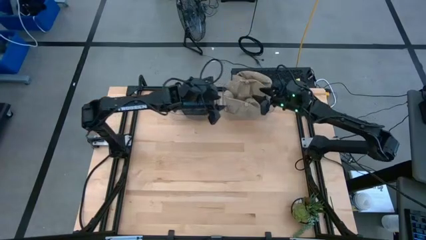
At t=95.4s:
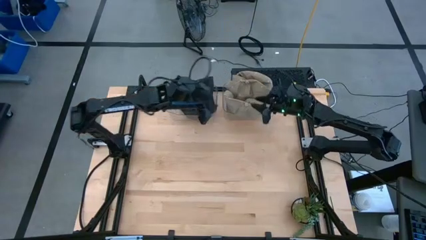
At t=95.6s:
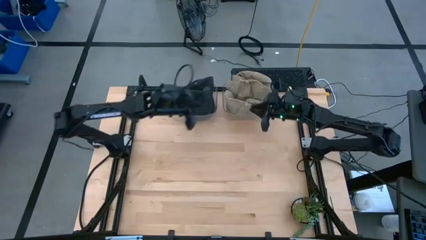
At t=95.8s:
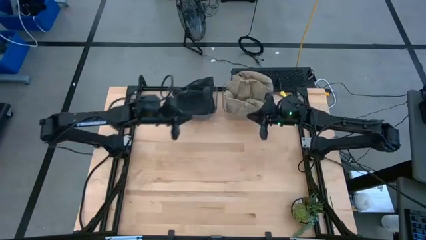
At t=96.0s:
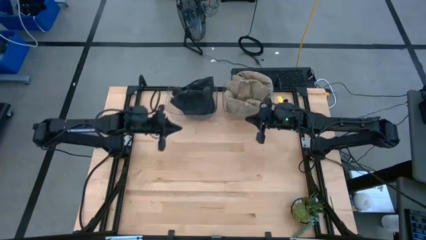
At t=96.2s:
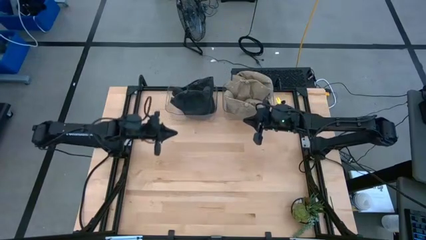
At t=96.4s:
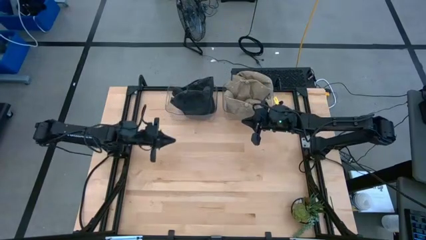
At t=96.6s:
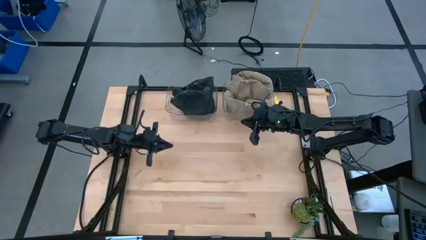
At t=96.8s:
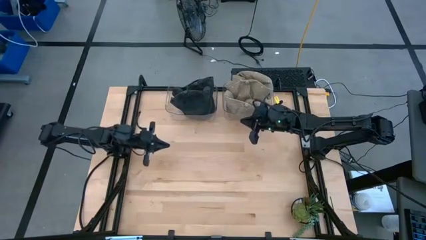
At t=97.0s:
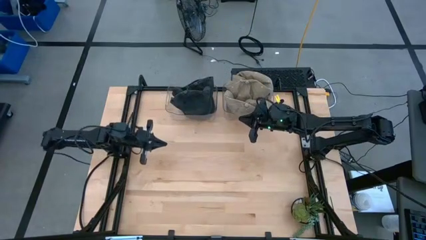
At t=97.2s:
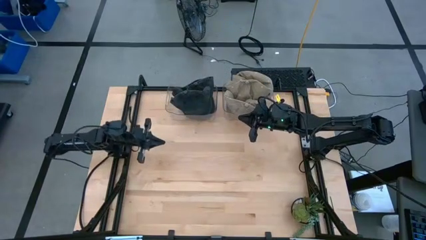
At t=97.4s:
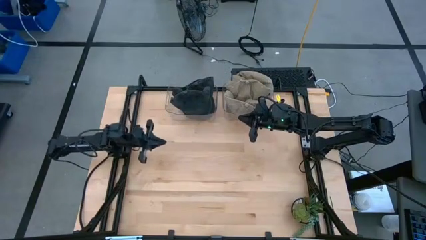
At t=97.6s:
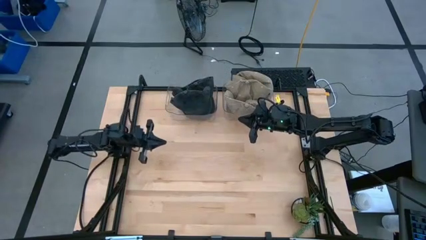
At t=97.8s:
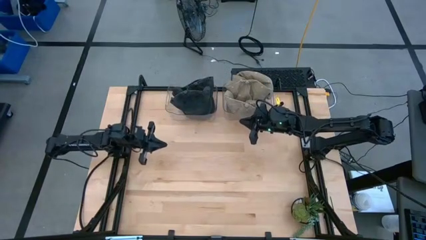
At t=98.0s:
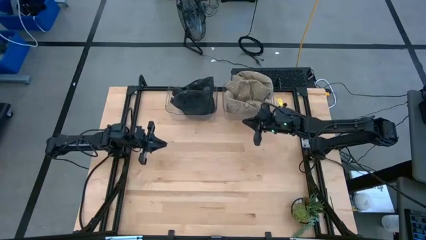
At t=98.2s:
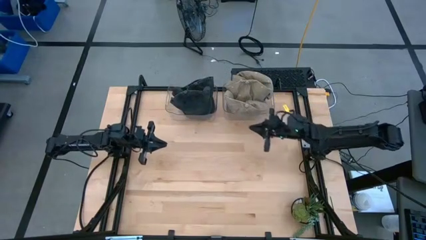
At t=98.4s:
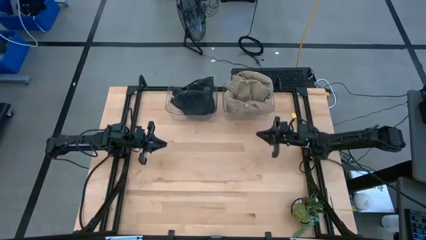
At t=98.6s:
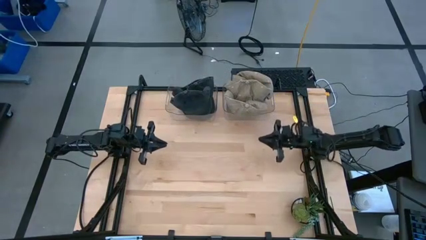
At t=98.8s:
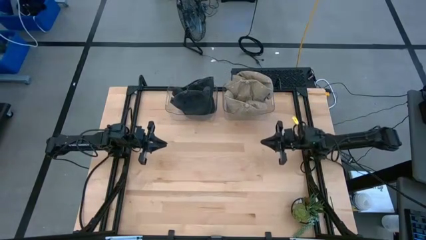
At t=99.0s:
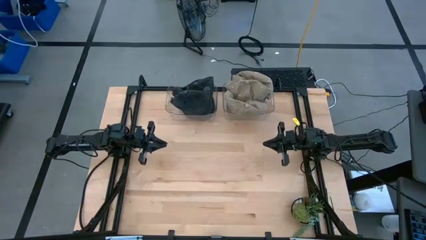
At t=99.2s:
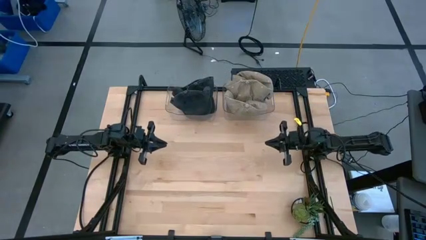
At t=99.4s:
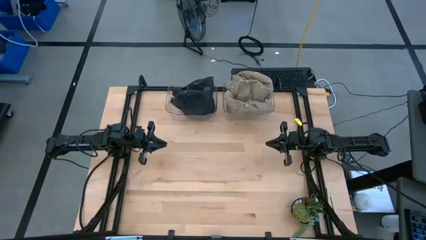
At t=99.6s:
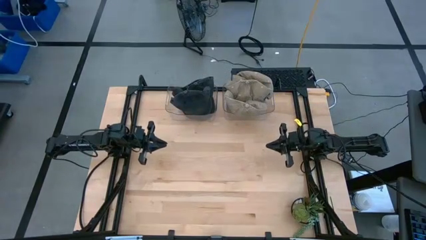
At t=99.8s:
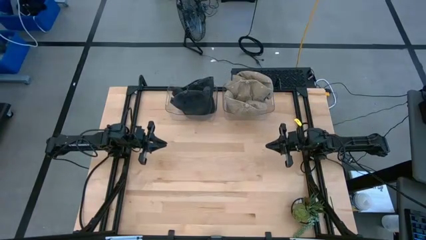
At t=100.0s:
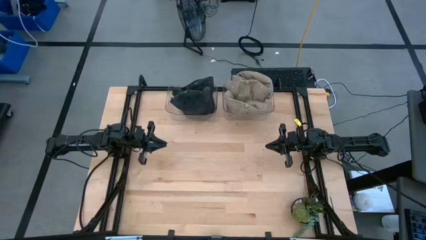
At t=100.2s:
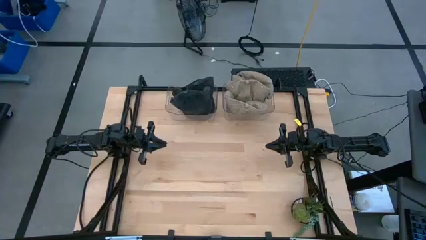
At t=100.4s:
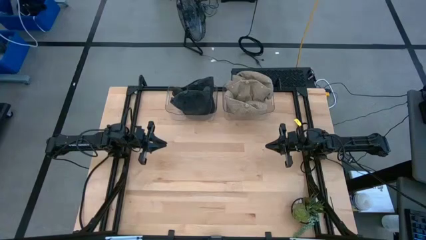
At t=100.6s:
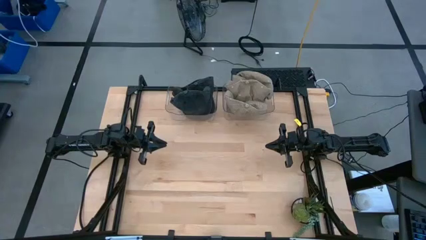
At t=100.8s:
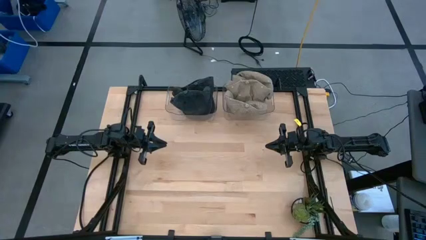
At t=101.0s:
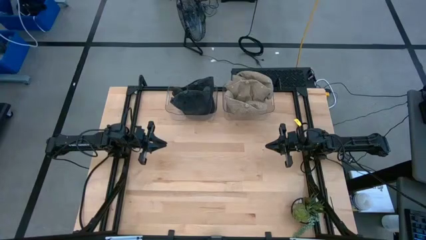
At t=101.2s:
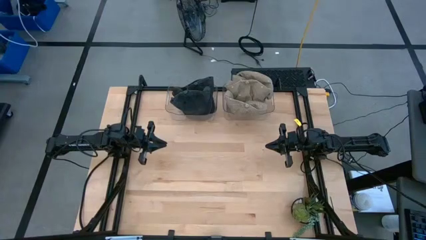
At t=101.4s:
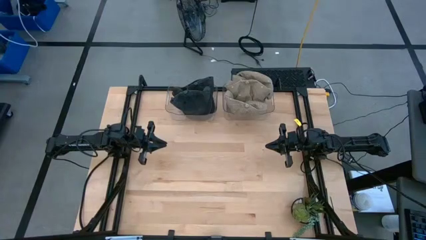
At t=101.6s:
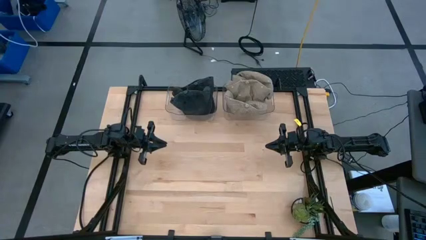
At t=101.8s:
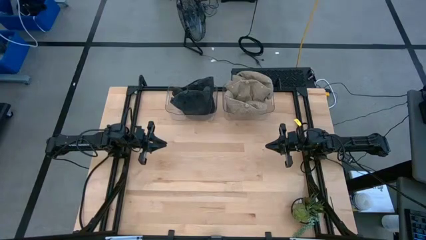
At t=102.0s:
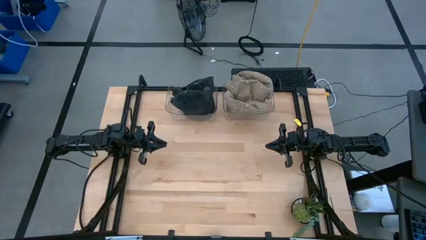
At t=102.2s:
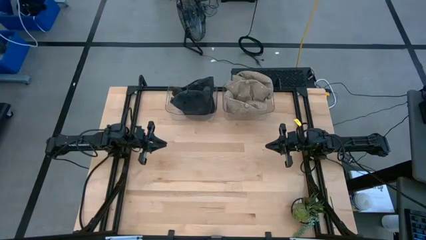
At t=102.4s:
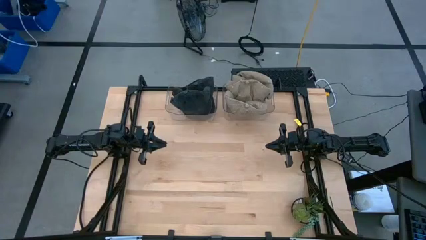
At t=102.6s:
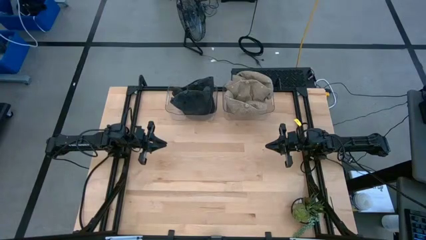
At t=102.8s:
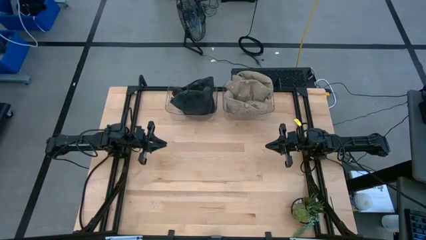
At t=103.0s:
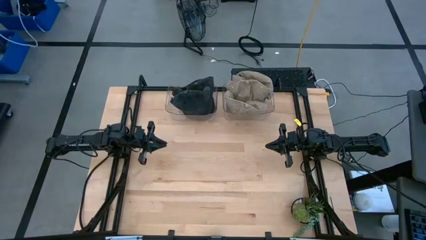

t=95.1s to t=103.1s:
Task: Pick & Place hat
Return to Home Position

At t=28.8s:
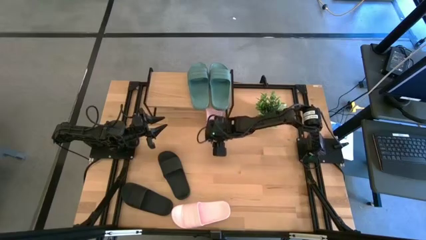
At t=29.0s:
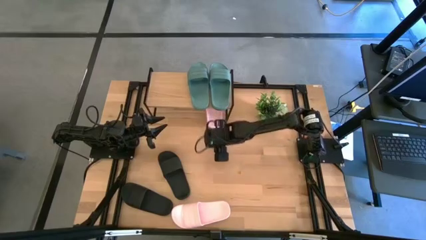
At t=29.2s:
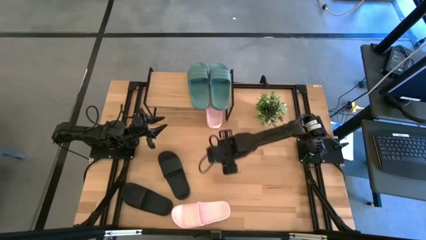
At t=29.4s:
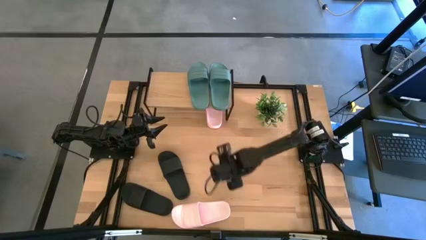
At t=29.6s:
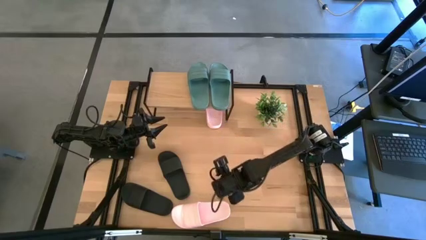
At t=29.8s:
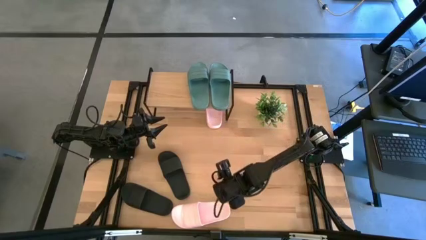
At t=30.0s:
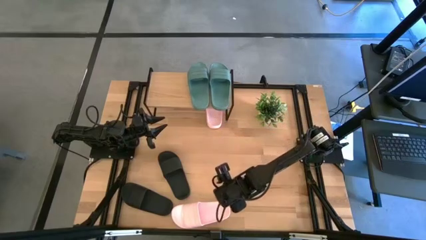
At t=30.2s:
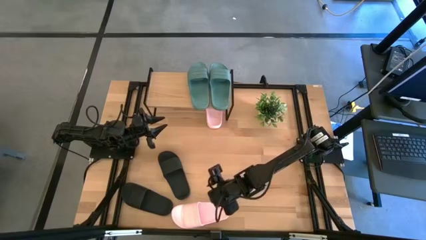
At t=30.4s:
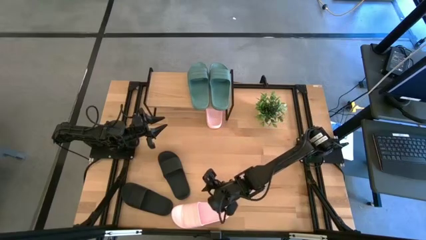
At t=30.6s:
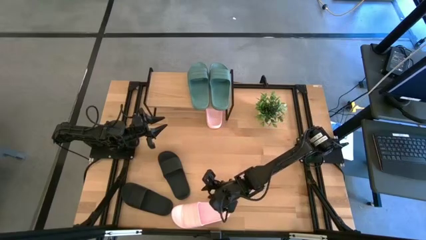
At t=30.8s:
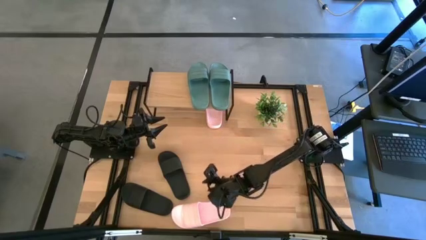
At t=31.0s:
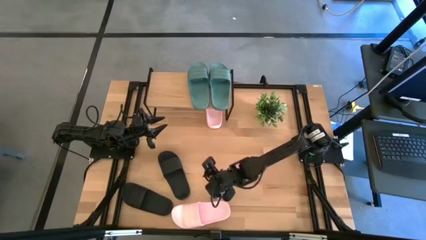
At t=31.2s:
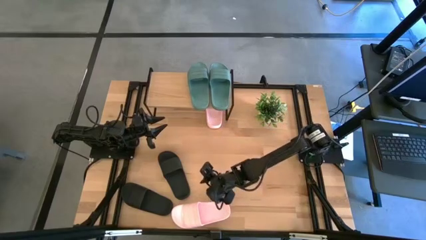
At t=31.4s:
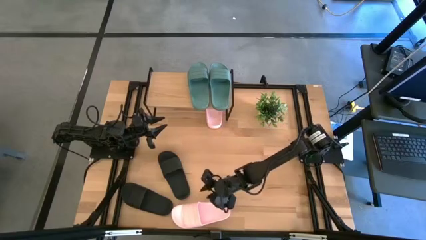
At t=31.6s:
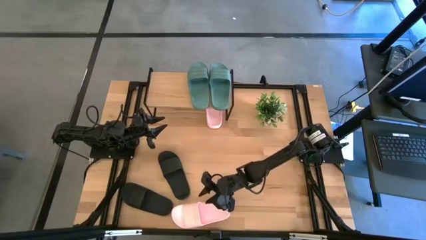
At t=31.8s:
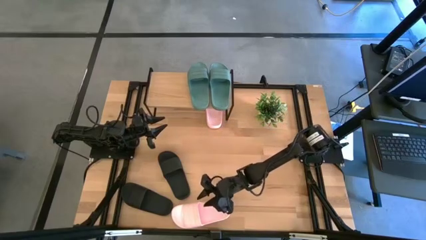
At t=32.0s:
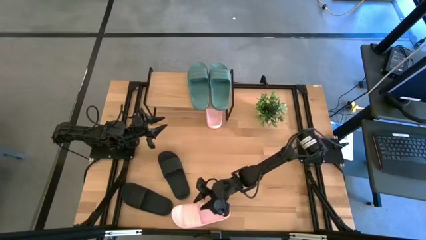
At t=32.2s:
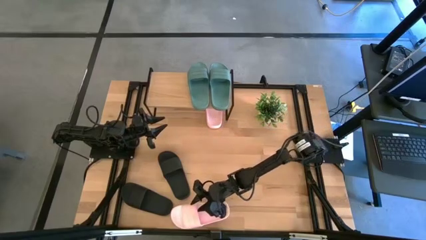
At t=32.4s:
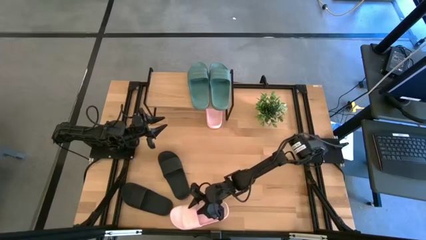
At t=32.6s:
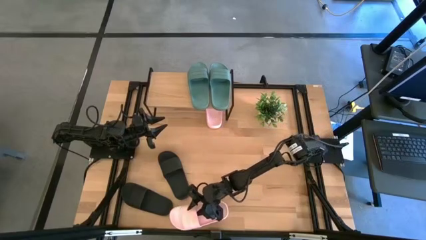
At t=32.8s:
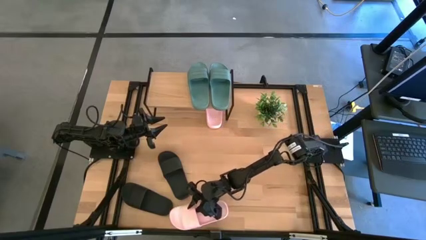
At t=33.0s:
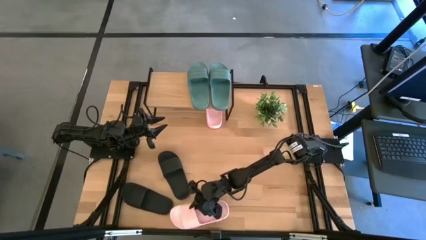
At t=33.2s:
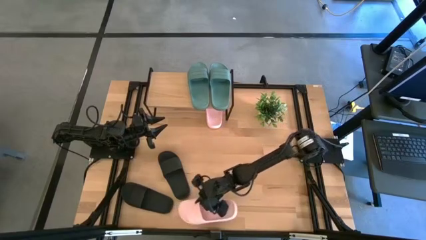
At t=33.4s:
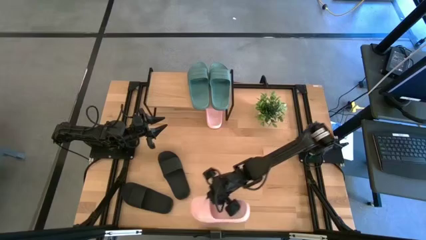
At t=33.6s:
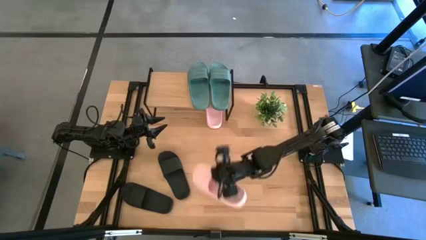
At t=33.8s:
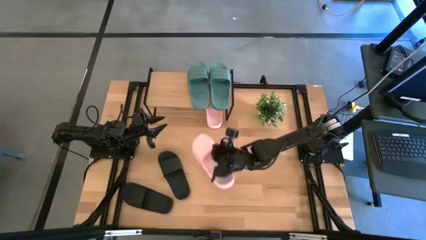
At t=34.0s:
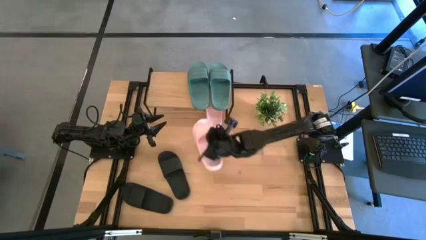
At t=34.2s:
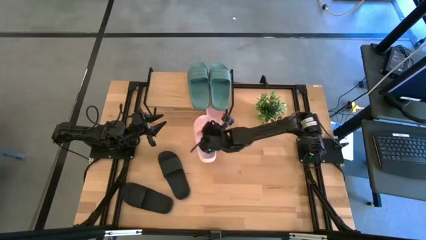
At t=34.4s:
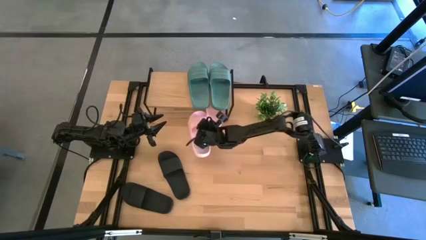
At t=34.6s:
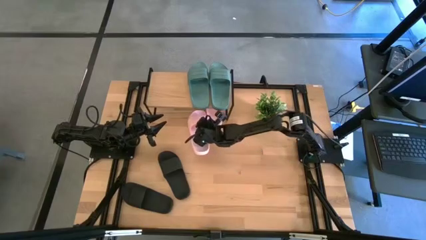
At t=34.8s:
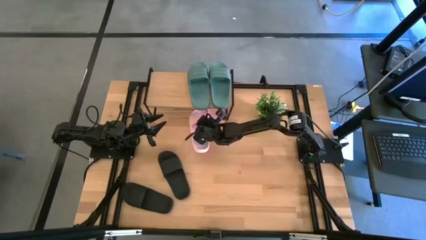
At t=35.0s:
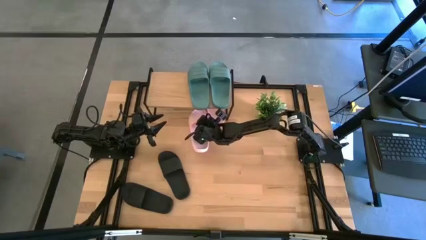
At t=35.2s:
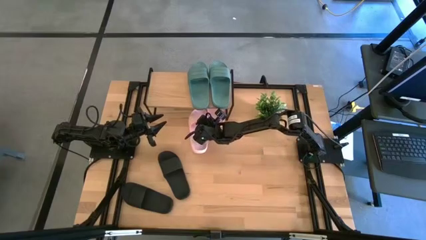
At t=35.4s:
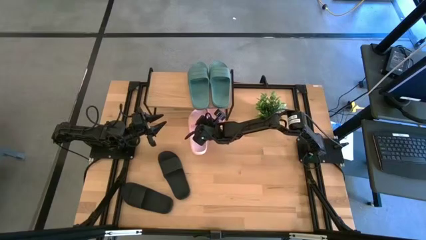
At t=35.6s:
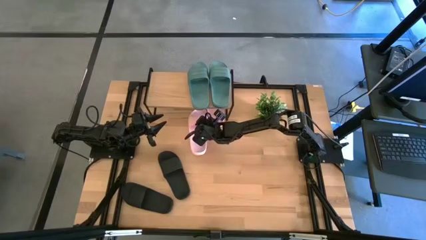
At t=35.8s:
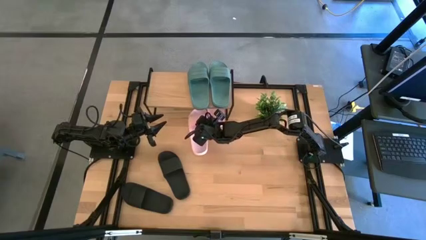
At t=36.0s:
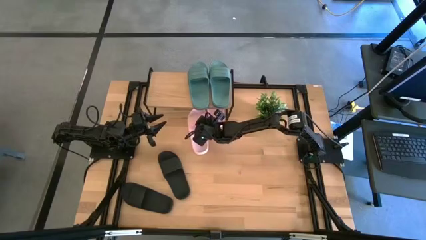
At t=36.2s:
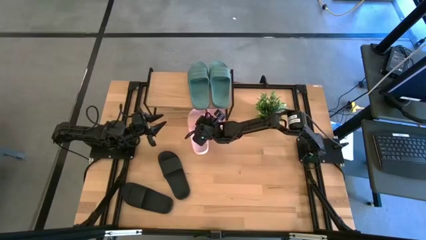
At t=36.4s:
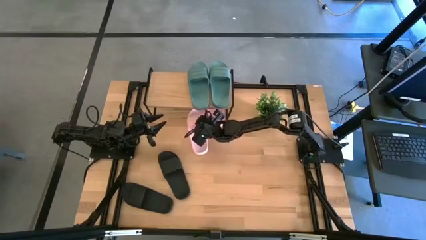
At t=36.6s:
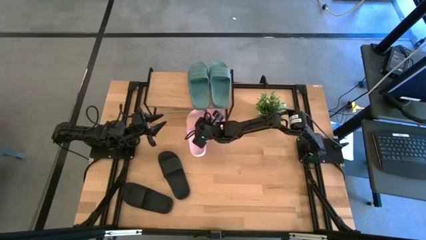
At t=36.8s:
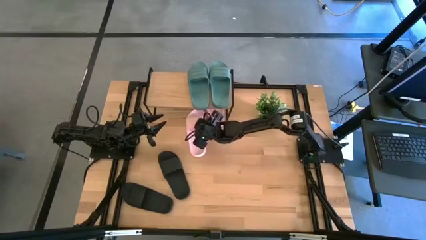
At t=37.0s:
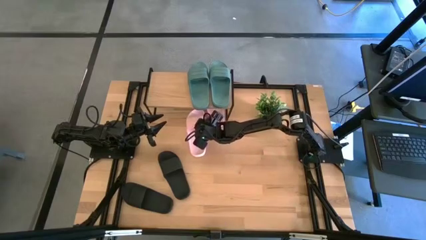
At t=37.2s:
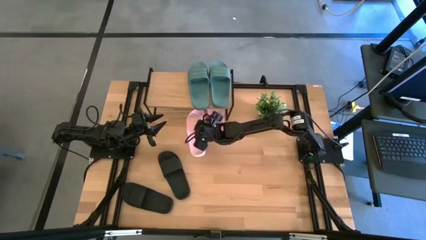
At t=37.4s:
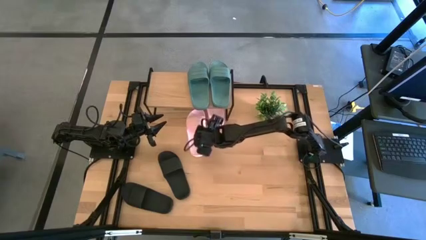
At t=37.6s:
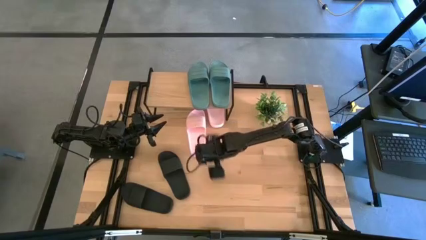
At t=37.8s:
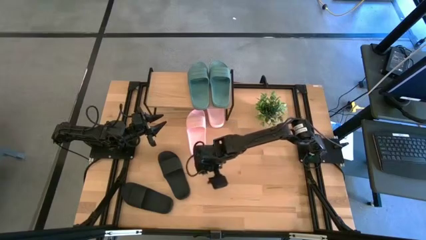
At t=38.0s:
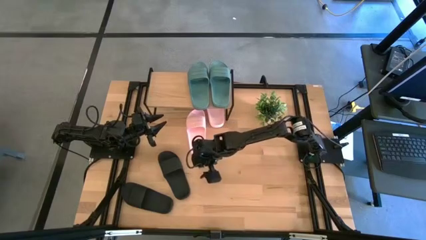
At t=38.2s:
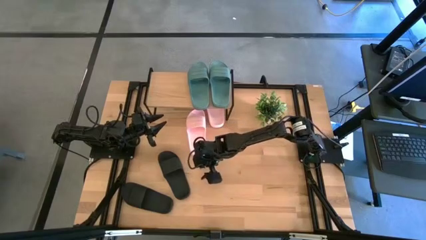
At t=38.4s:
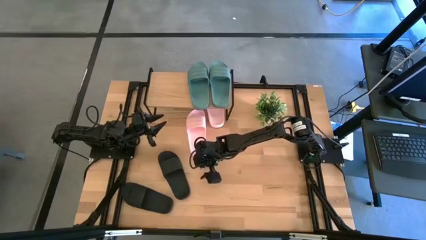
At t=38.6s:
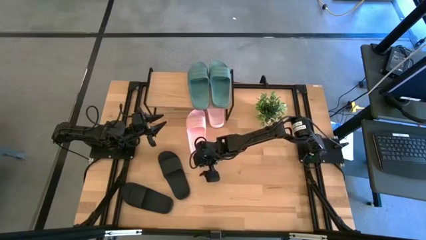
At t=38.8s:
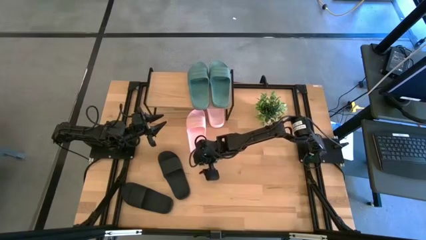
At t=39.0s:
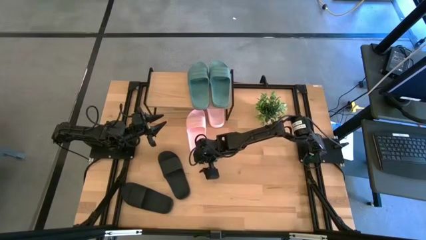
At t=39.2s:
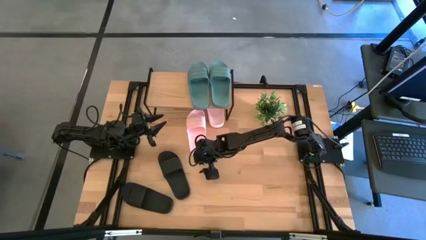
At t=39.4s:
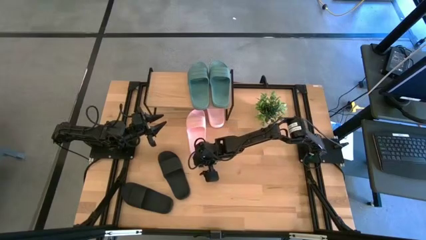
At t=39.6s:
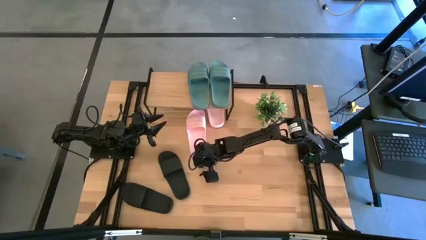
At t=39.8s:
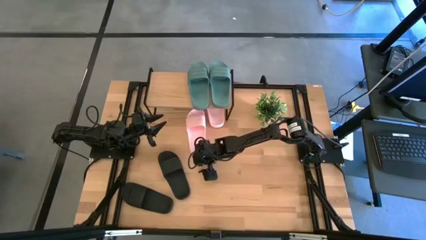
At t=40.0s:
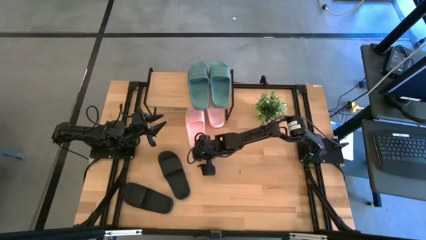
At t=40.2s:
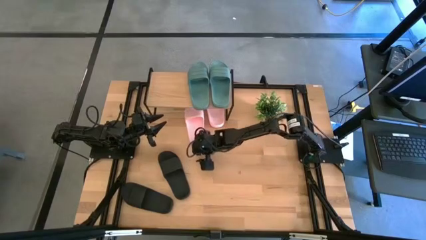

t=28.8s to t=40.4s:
Task: Pick and place slides into the shelf
Put the pink slide under the shelf
